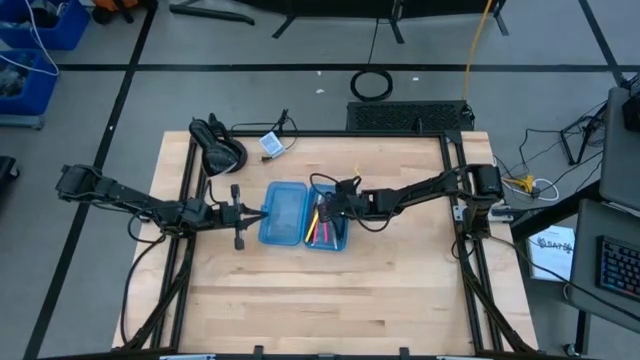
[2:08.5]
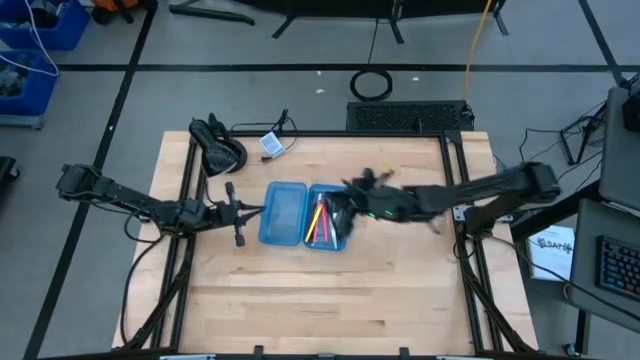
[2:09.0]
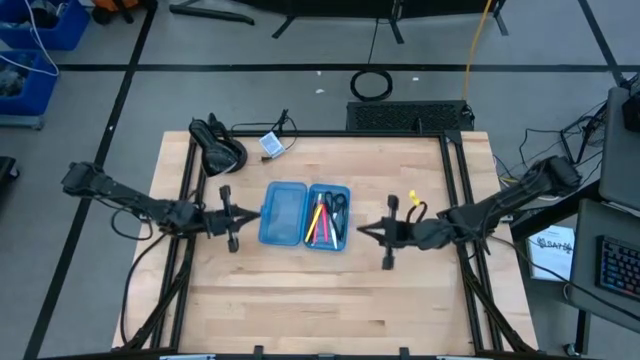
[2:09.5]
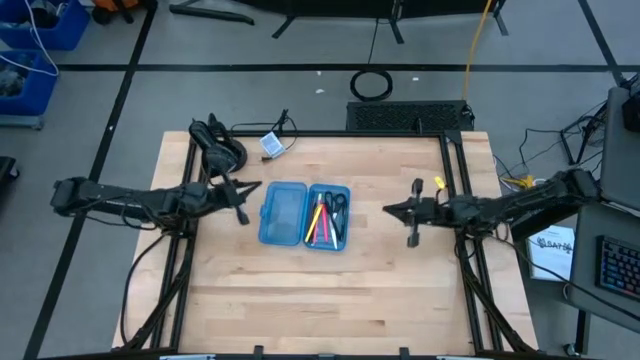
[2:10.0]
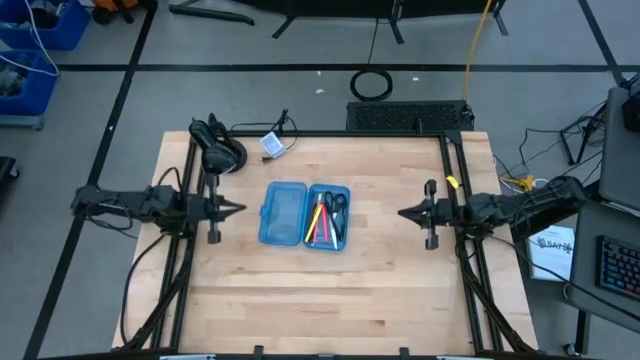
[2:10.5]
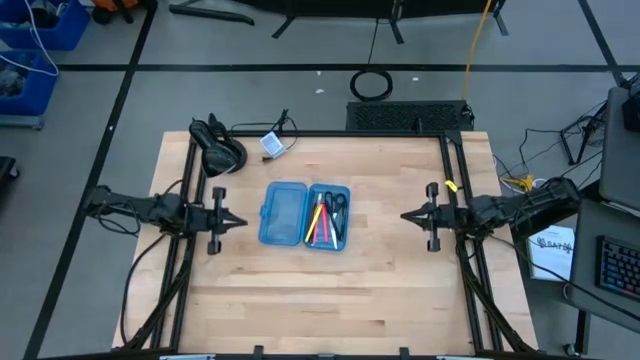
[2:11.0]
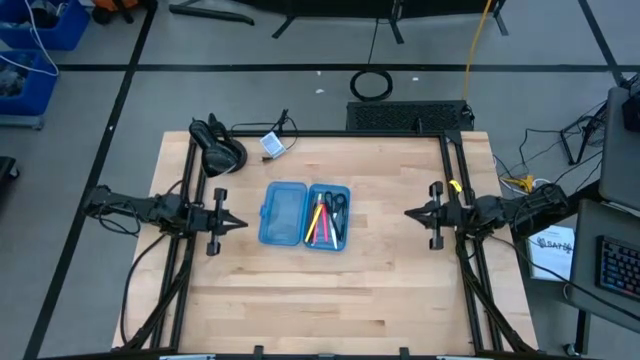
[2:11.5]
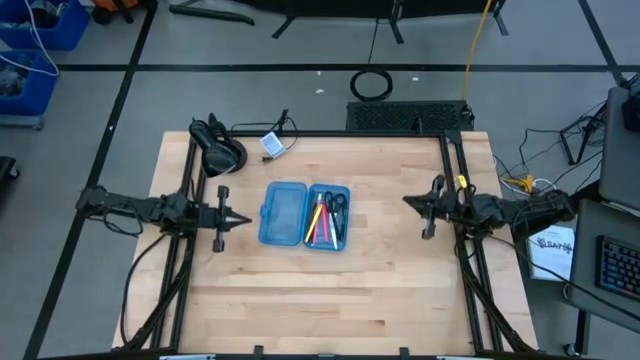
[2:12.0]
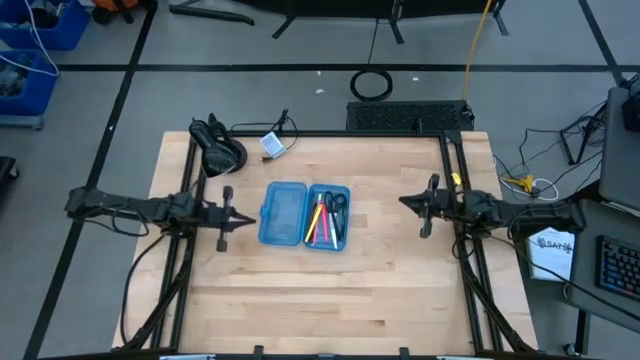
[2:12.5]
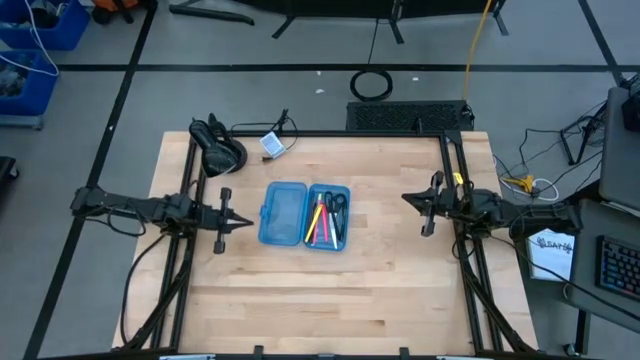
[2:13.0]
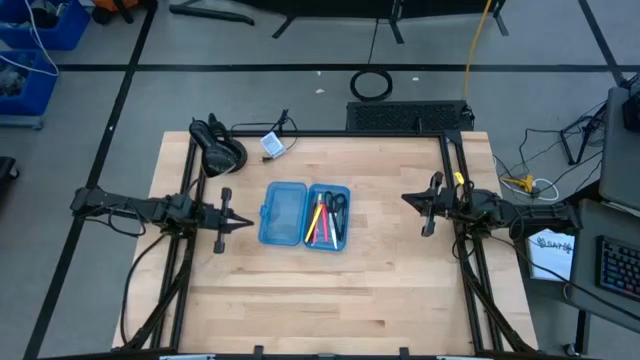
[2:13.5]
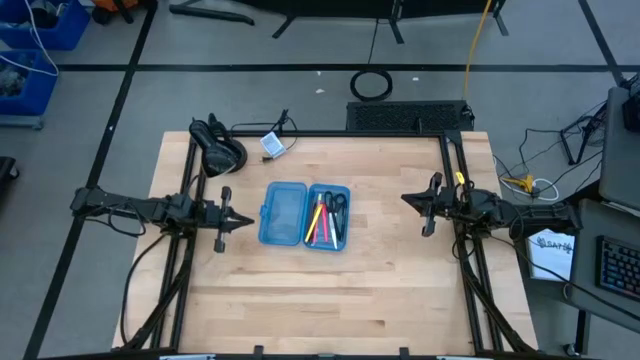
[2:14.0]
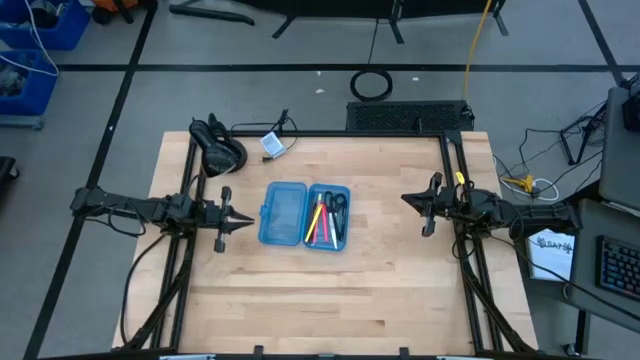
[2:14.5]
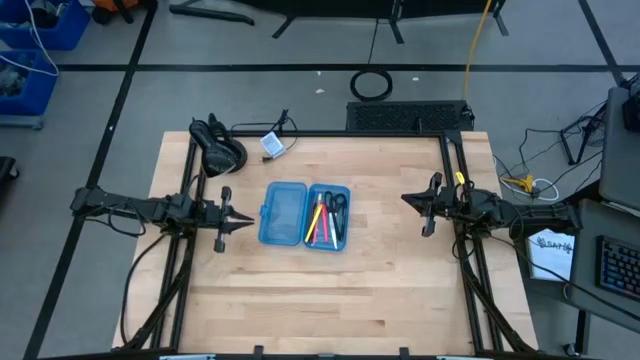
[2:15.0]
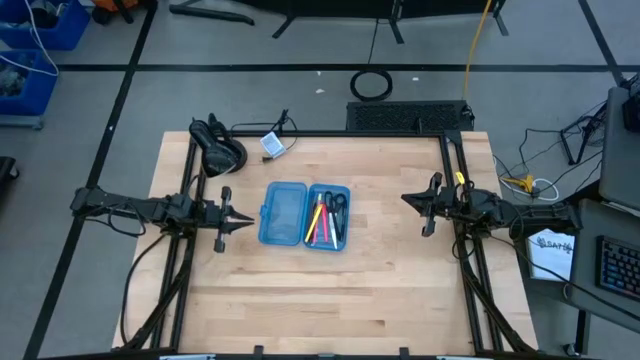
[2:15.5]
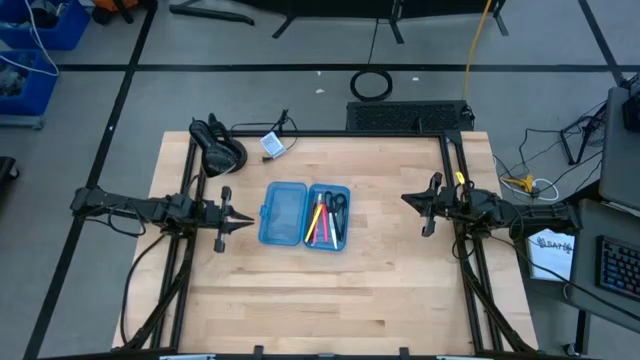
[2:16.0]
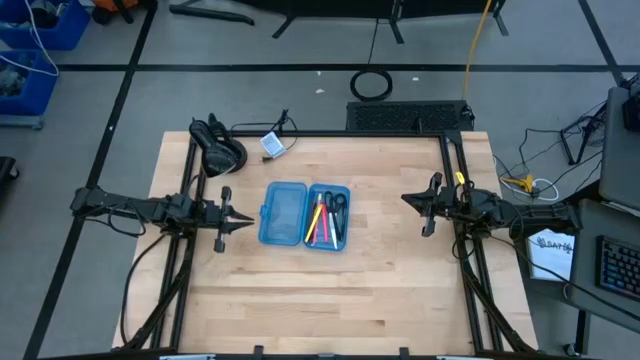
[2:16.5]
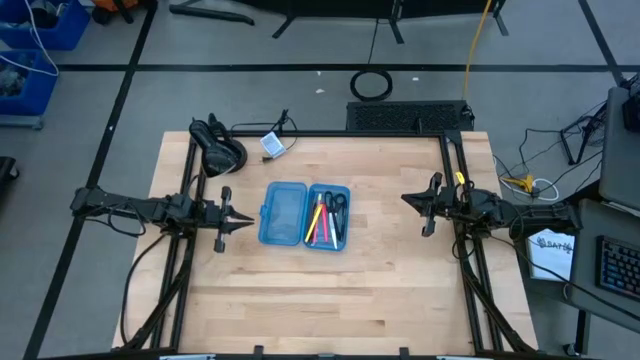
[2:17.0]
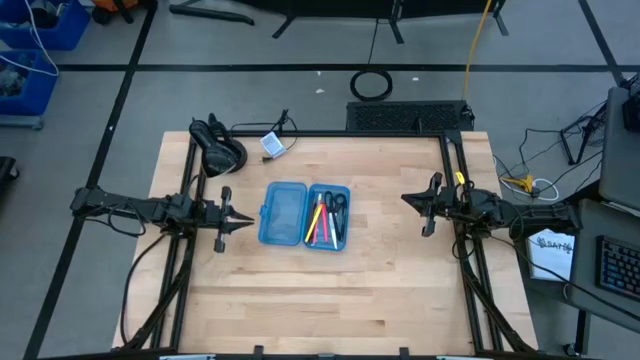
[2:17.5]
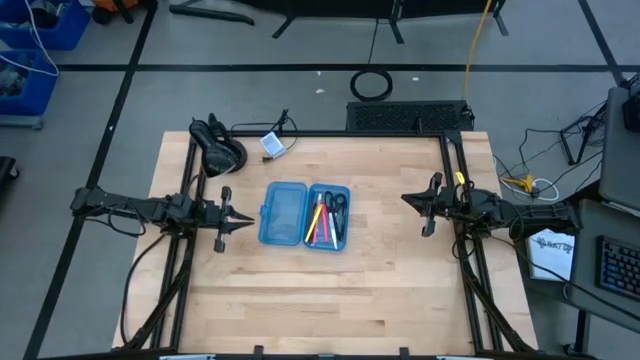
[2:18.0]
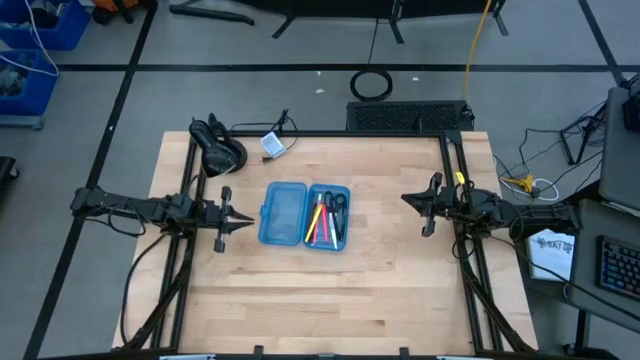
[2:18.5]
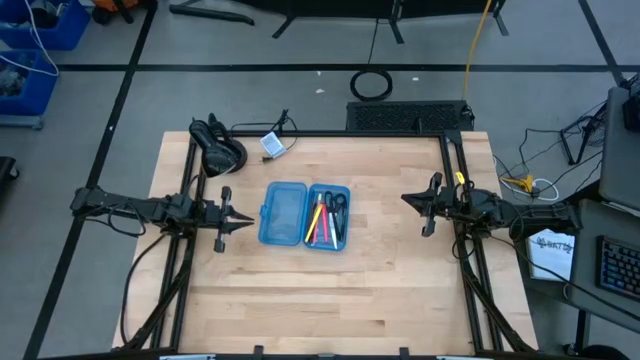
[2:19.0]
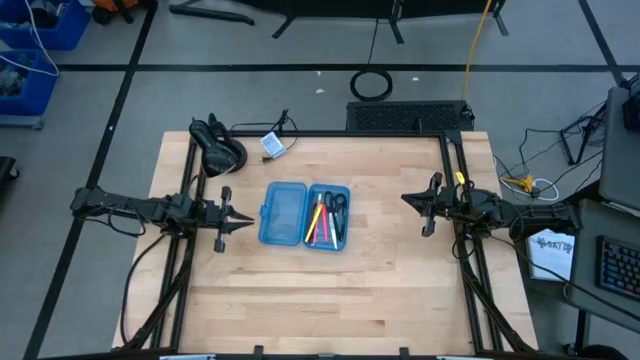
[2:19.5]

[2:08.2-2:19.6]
Task: Pick & place school supplies into a supply box
Return to Home Position

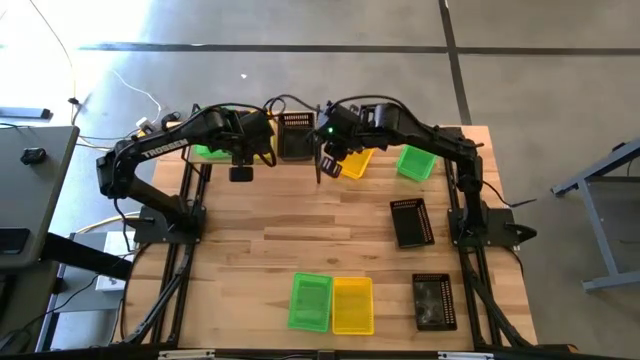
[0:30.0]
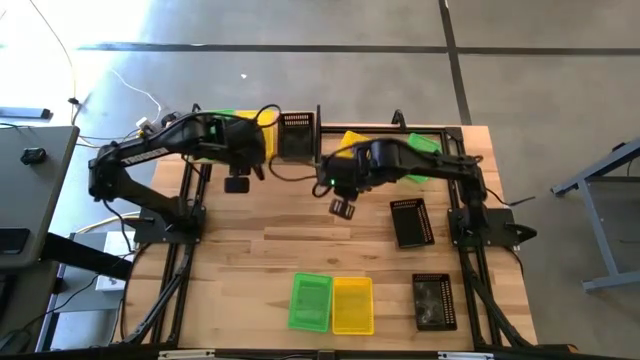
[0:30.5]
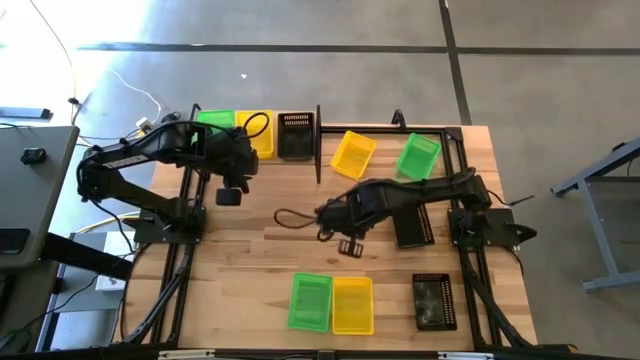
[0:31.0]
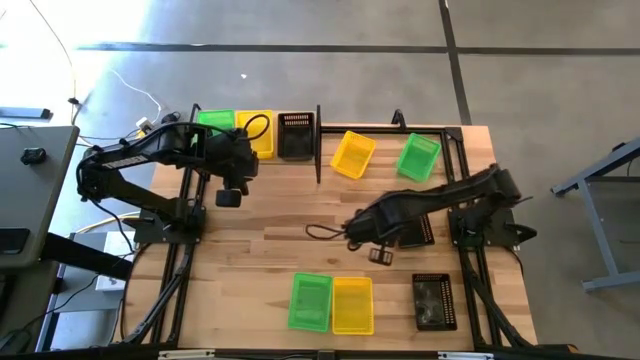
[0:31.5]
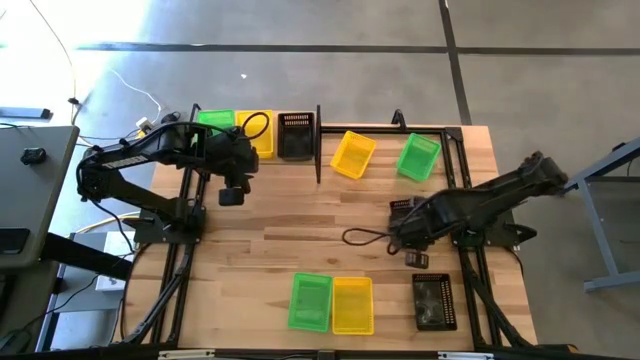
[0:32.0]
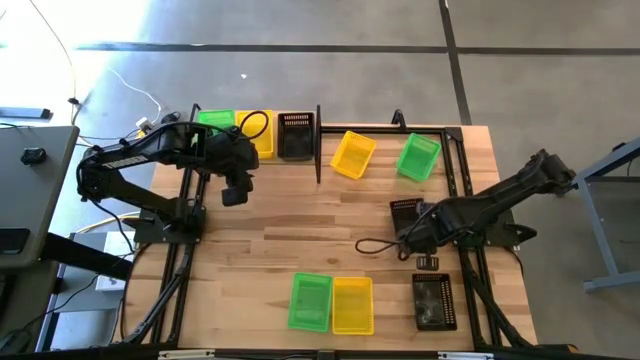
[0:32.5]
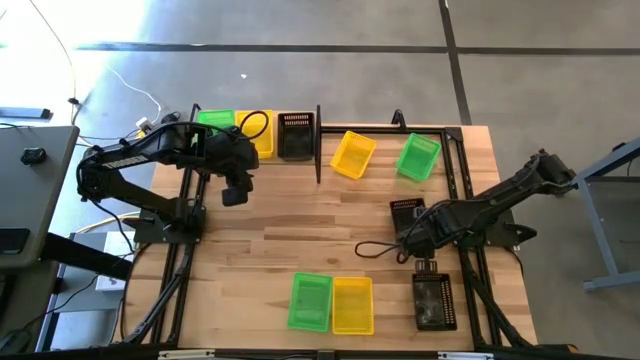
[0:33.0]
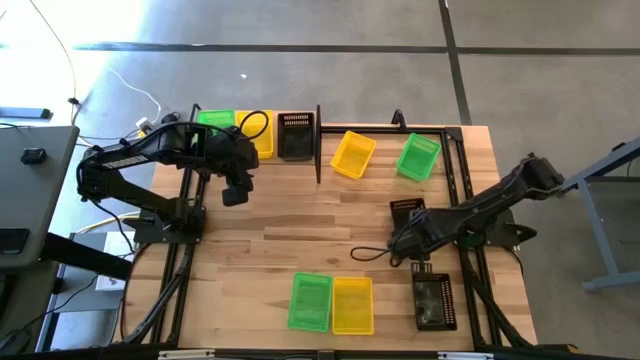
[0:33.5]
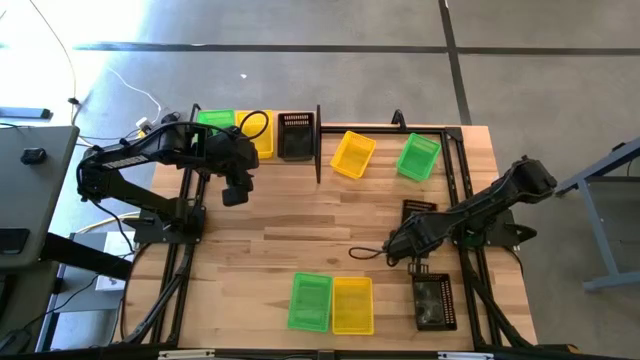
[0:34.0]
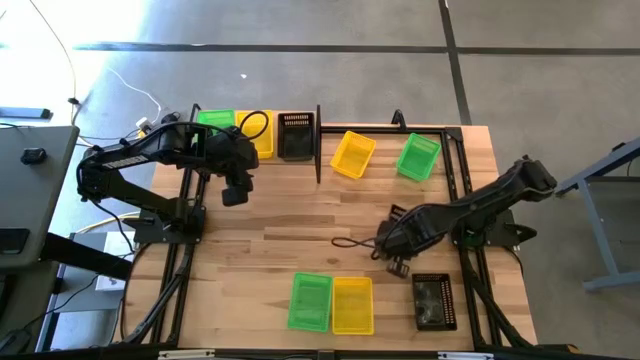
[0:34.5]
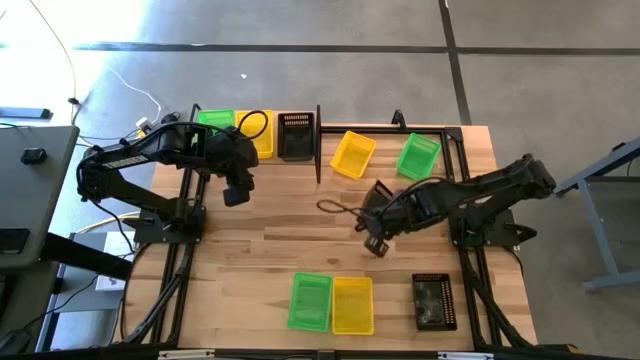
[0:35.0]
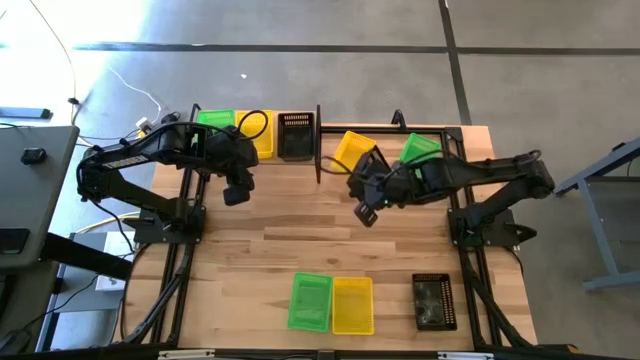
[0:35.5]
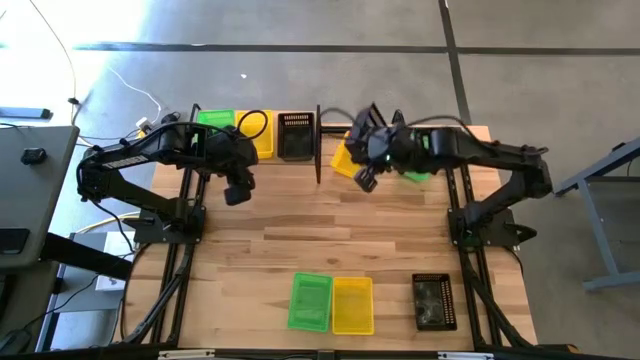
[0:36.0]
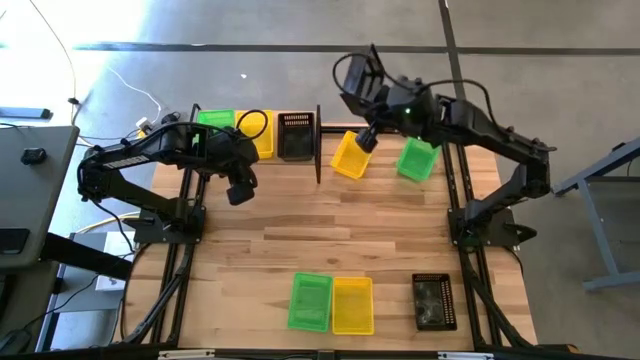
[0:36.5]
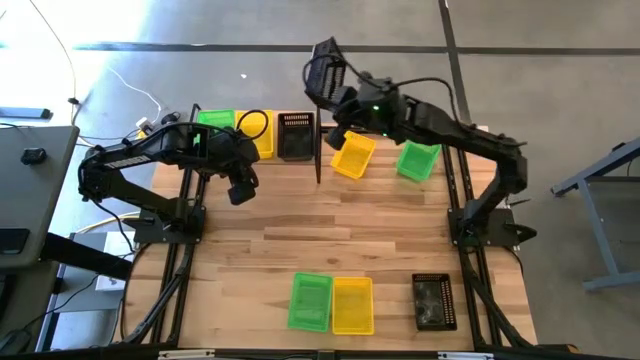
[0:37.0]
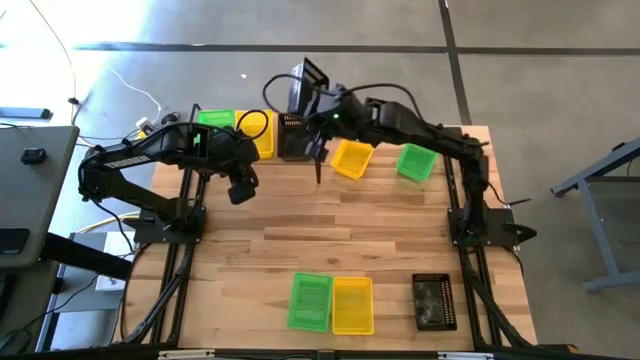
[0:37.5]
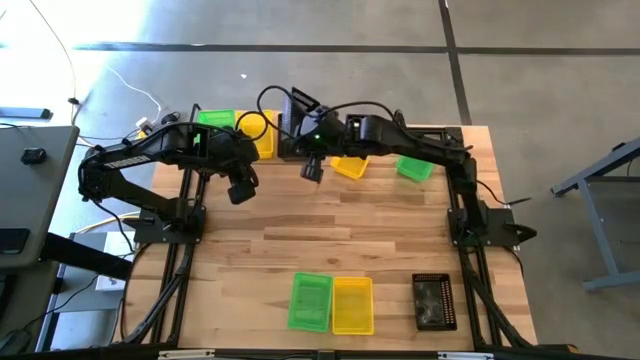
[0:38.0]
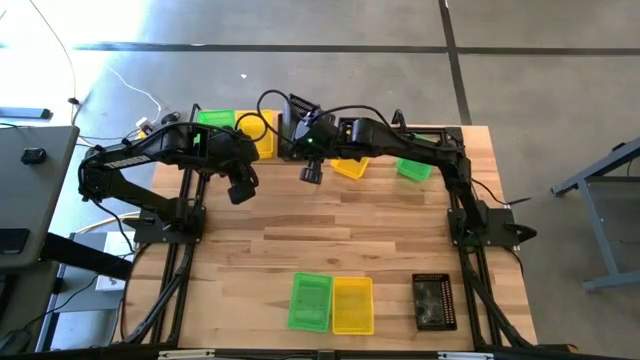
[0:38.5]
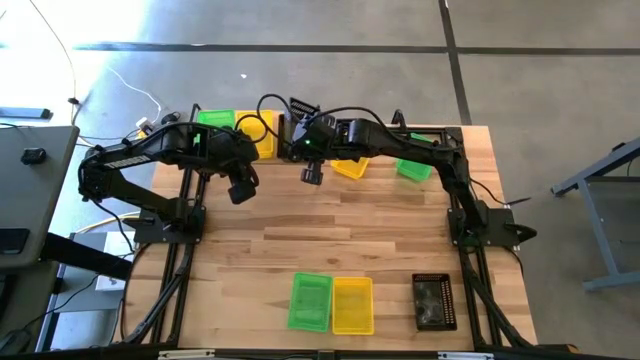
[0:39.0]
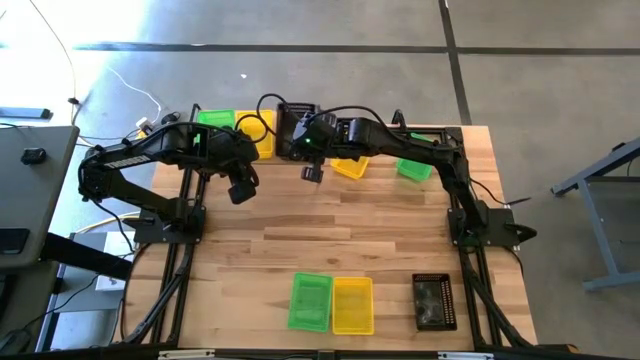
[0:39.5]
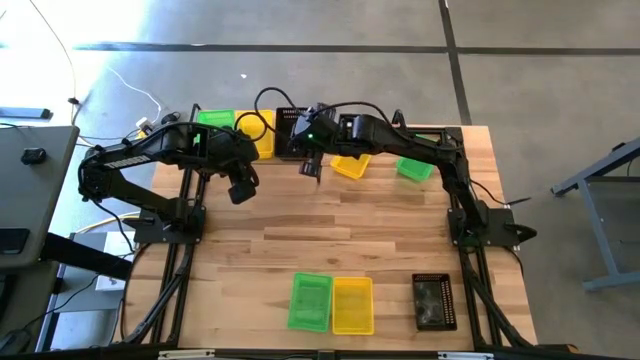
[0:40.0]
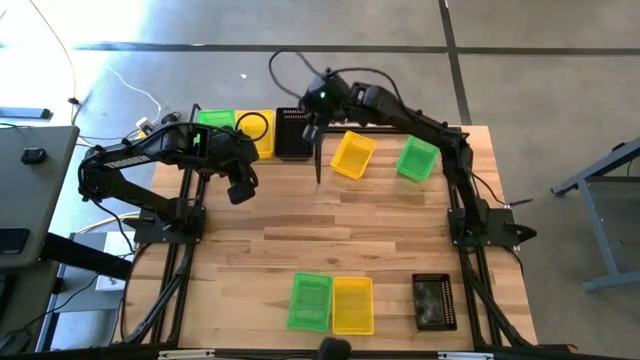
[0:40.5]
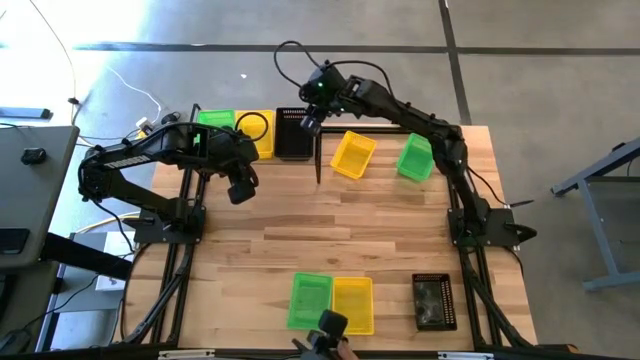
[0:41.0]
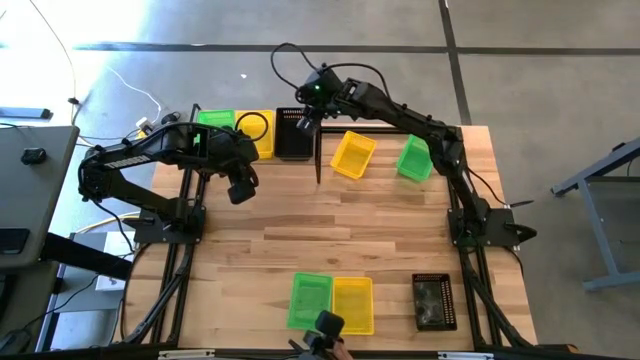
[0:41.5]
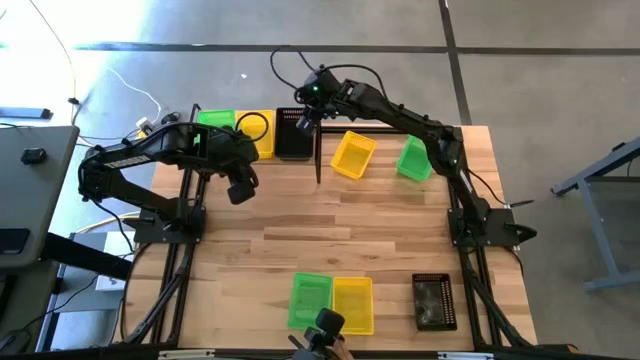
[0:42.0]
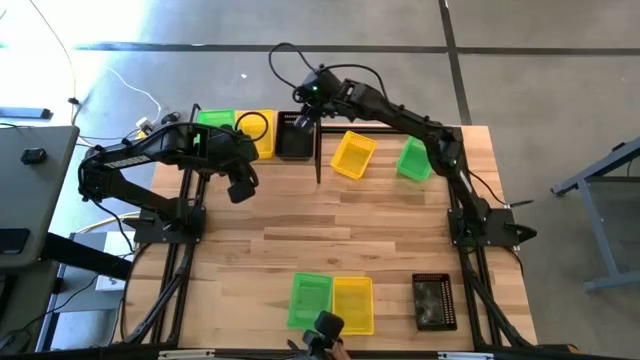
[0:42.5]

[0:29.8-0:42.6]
Task: Stack baskets on shelf by color
Stack the top black bin on top of the black bin on the shelf
